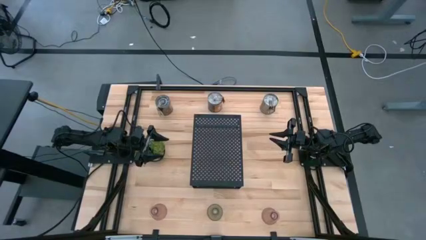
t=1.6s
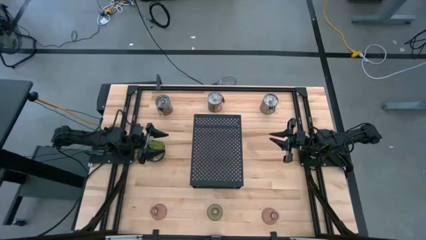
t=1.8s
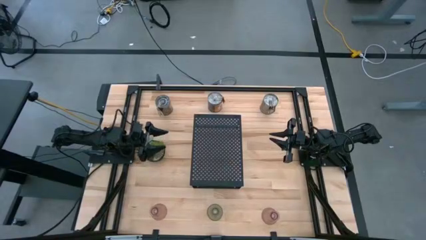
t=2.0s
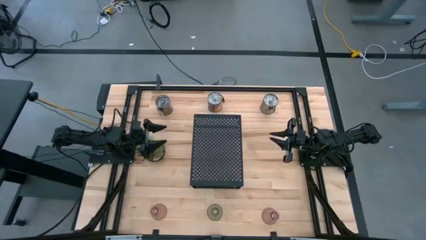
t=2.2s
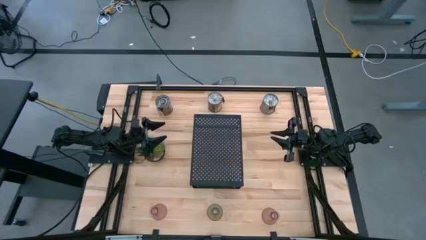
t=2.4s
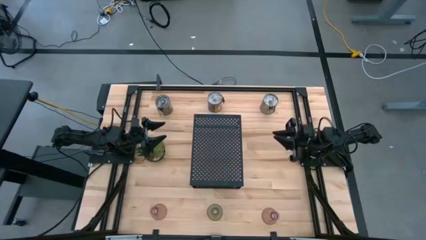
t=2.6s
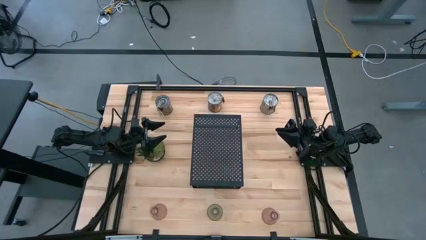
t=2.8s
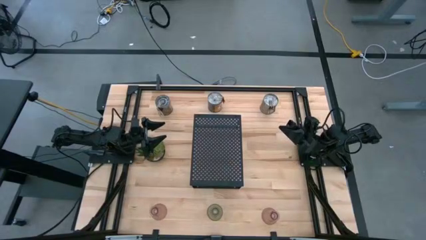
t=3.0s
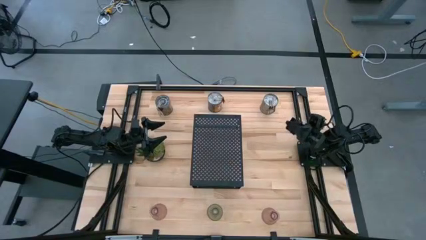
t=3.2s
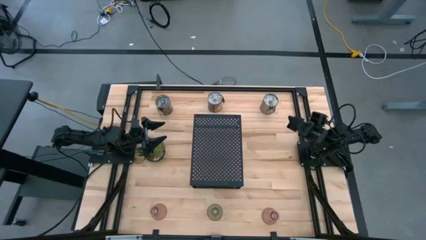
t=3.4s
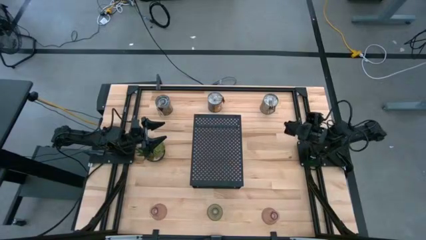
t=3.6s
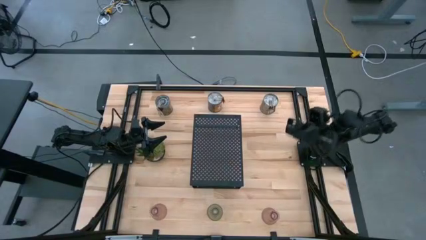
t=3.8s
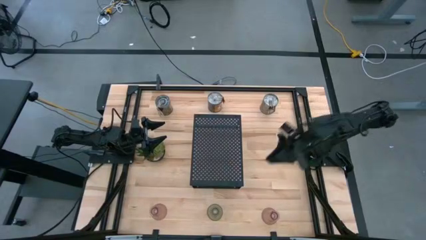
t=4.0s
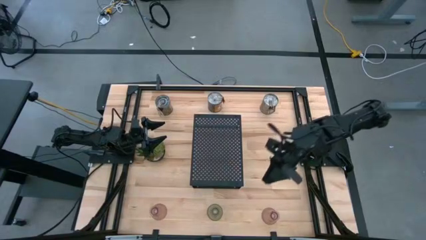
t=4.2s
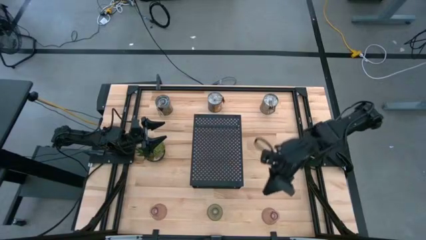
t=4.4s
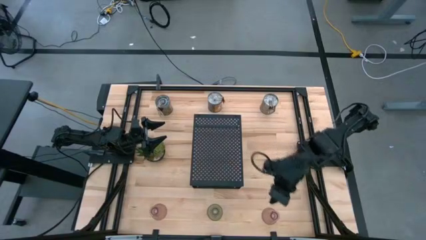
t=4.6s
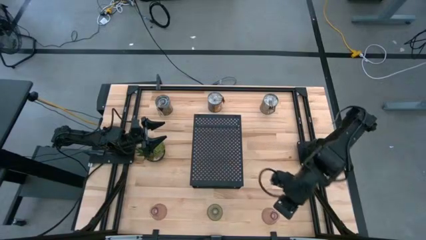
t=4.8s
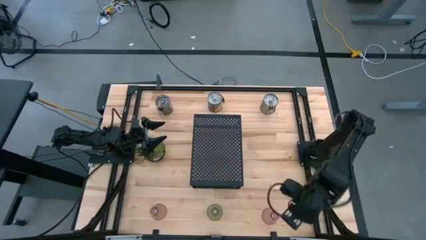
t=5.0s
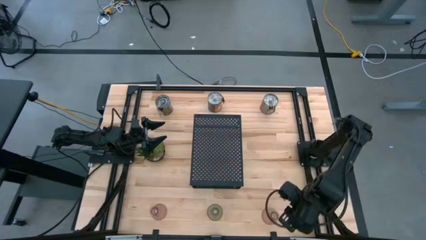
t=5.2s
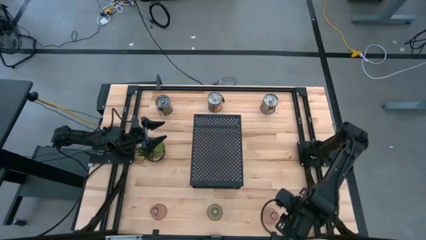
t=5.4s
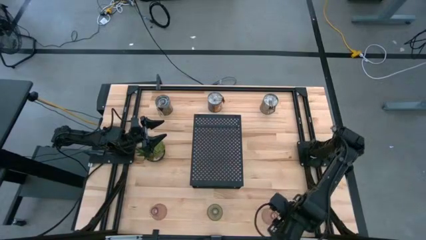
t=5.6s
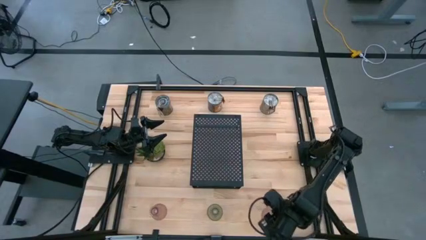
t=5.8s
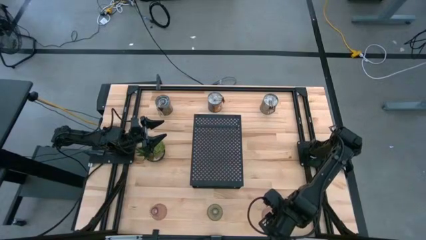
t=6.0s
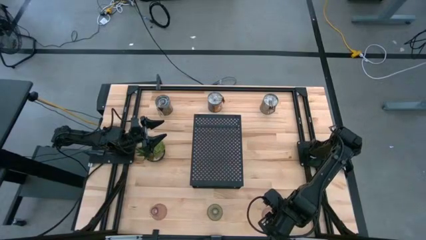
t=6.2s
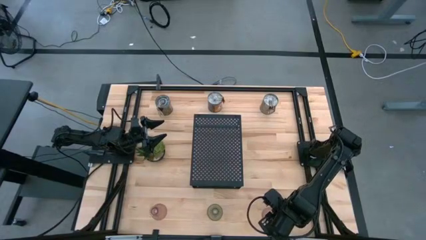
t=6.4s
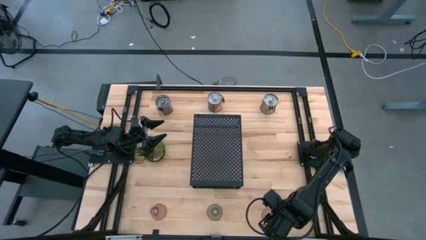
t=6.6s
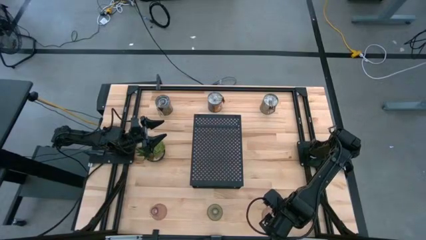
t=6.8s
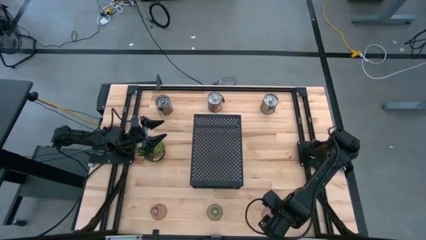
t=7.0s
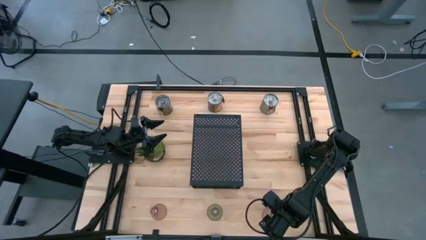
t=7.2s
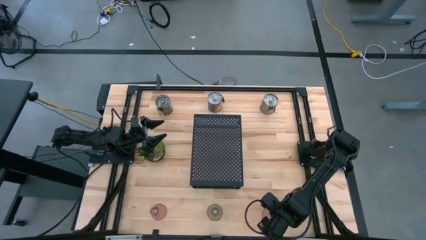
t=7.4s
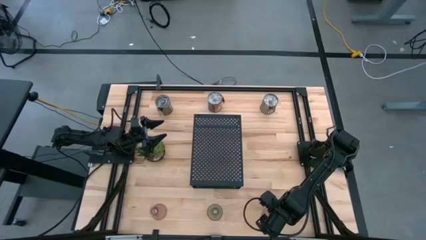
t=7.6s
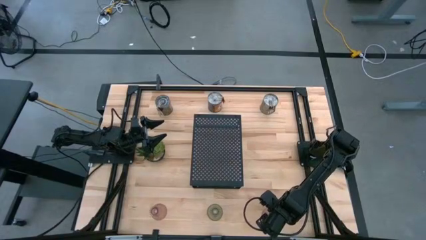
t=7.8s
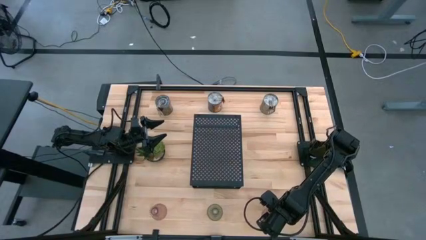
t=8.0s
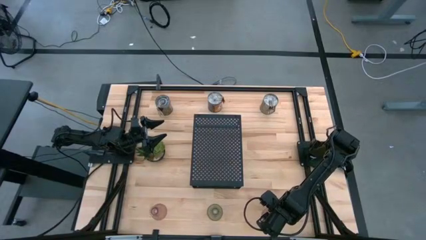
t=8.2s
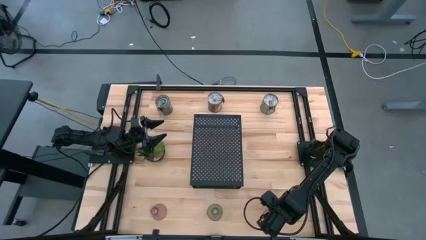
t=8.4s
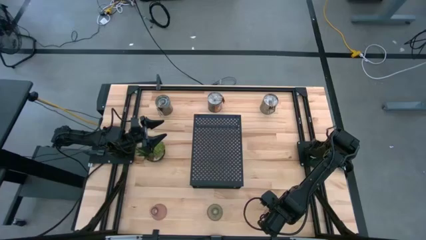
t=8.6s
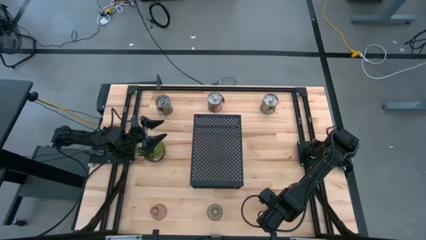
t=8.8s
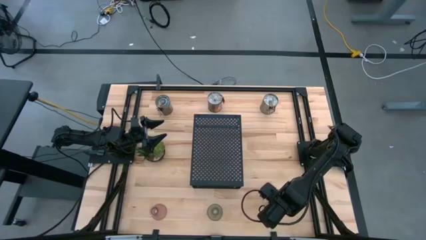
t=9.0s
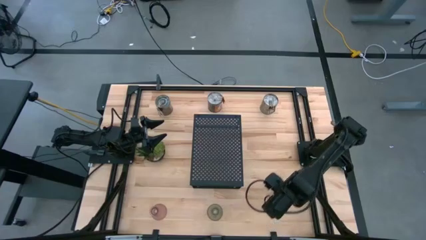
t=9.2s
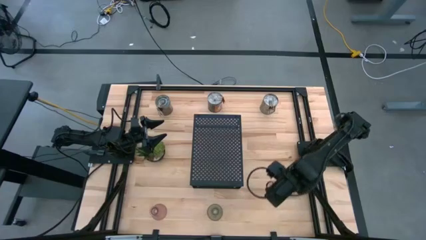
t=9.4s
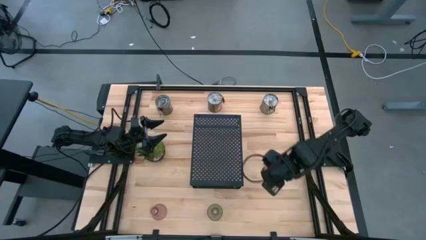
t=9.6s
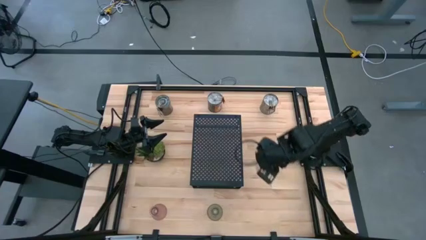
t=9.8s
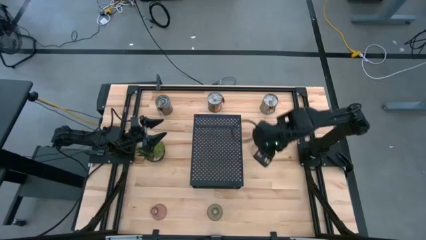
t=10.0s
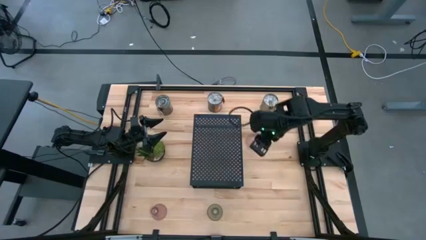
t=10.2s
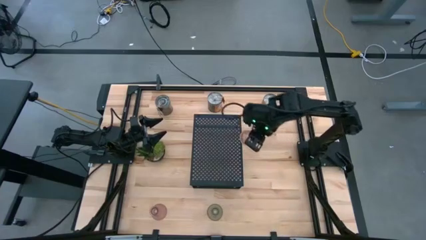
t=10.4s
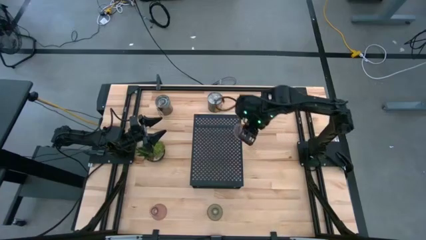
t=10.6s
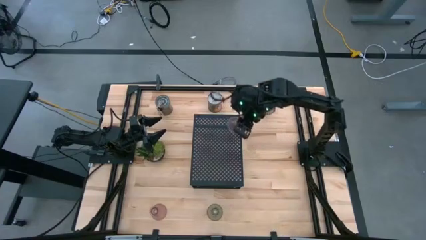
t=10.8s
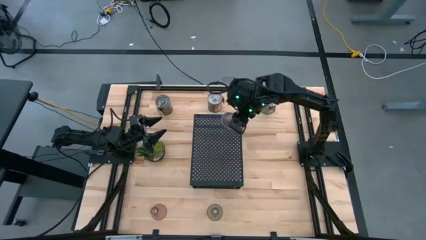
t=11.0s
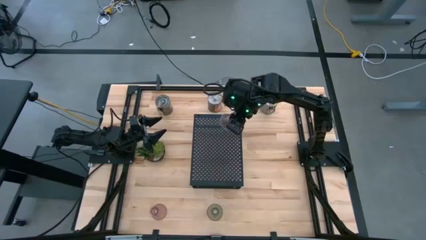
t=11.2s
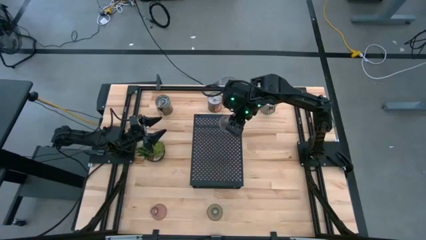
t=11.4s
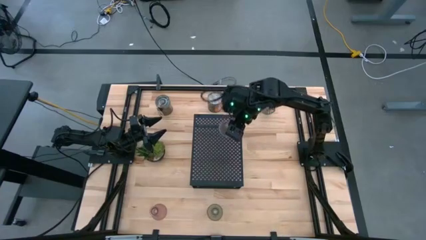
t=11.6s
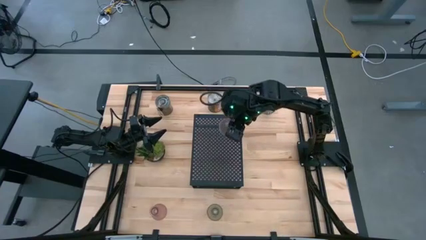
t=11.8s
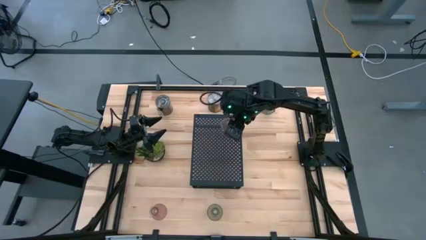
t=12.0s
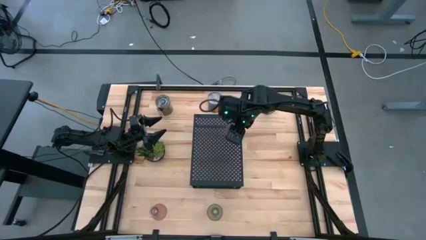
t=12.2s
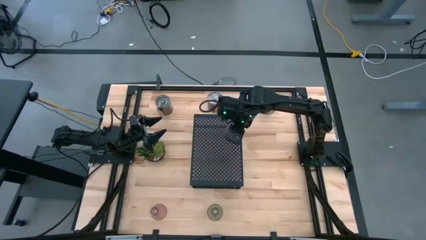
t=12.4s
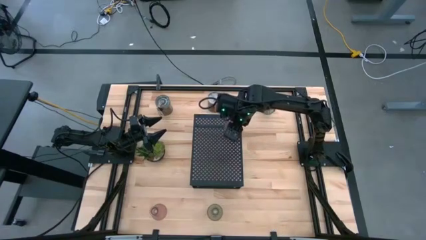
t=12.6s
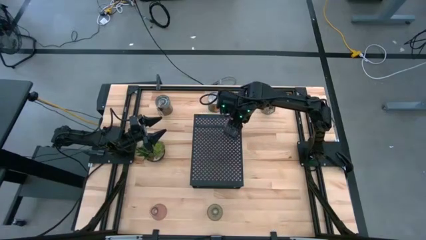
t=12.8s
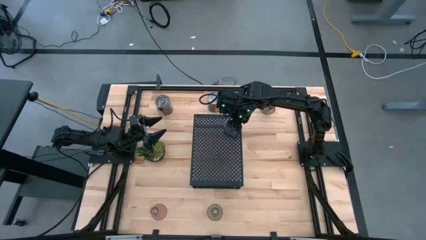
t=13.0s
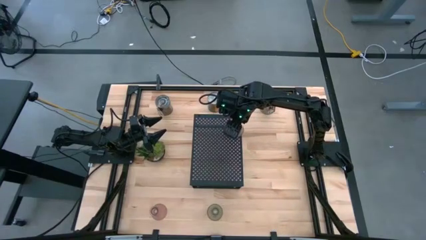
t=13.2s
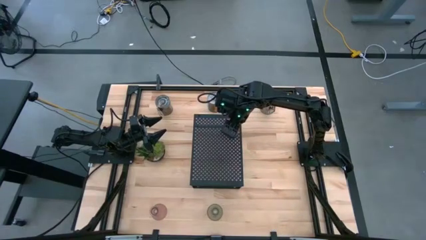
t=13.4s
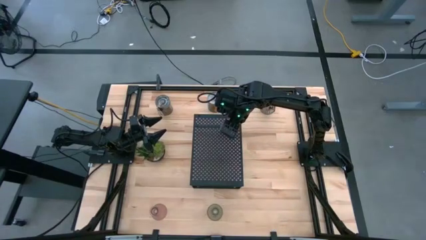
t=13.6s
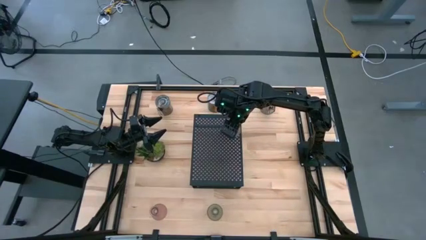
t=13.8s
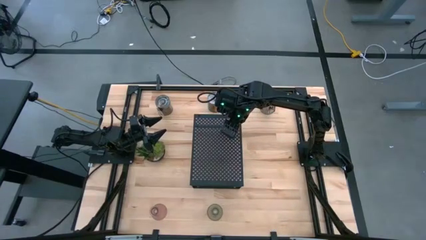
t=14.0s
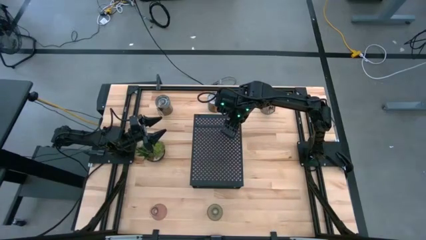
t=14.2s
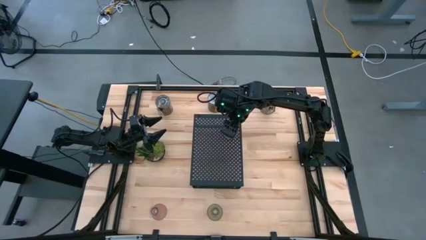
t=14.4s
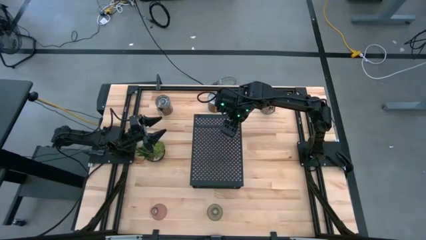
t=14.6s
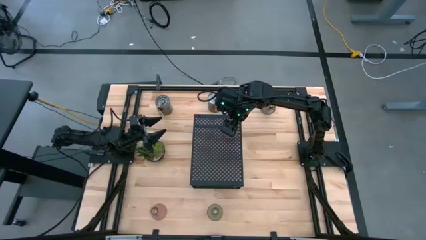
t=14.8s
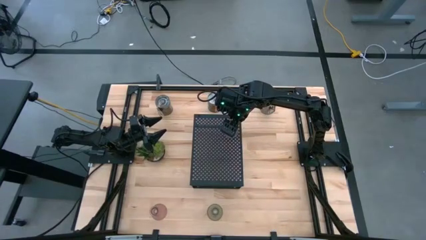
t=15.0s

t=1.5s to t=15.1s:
Task: Pick & Place candle stick holders
Put the right pink glass candle holder on the shelf
